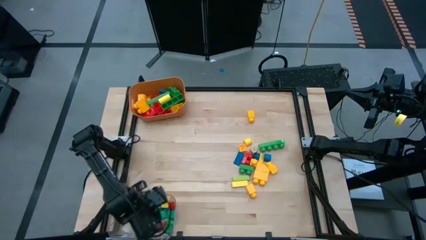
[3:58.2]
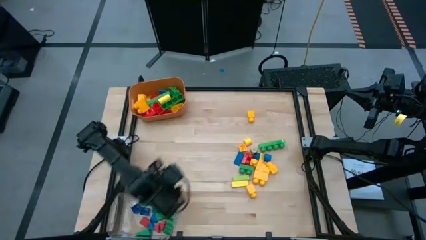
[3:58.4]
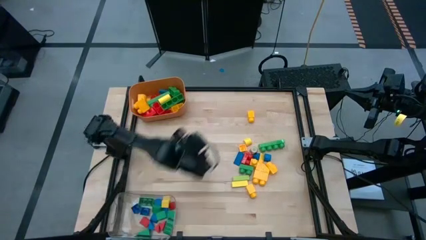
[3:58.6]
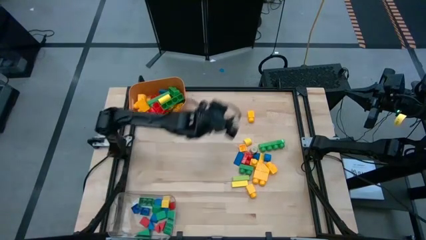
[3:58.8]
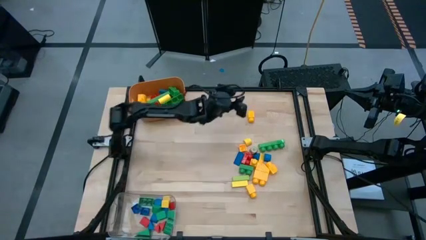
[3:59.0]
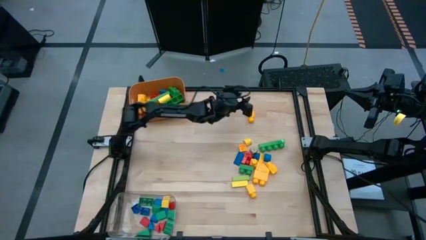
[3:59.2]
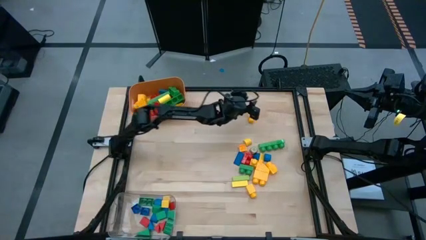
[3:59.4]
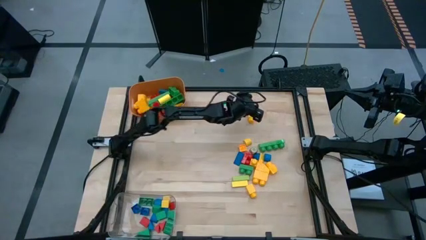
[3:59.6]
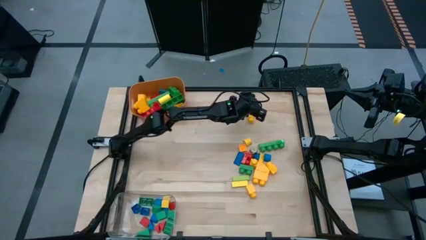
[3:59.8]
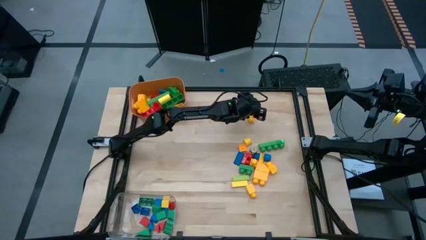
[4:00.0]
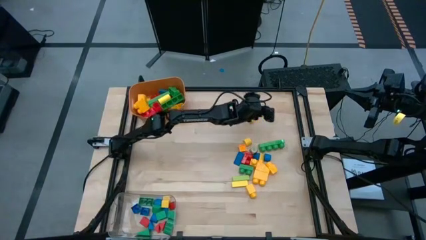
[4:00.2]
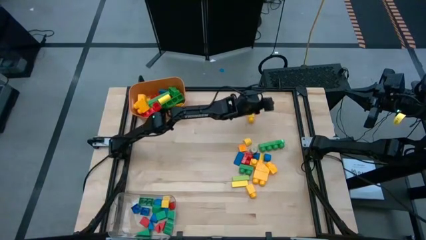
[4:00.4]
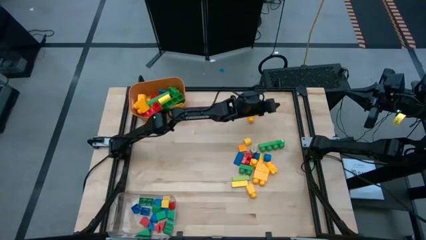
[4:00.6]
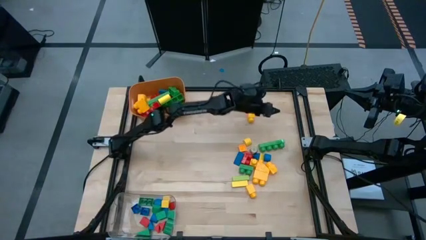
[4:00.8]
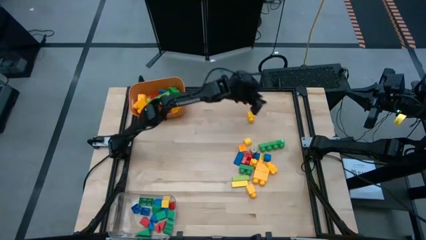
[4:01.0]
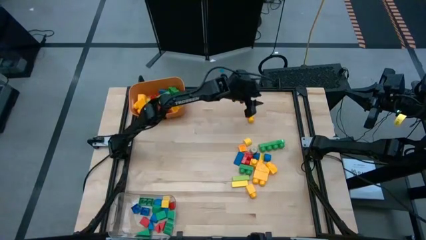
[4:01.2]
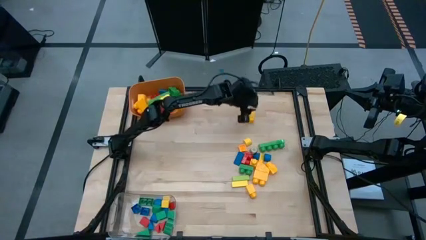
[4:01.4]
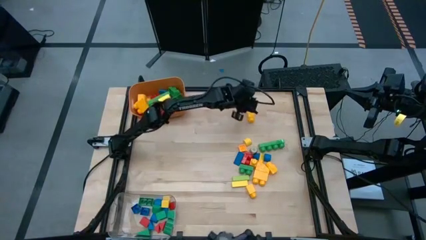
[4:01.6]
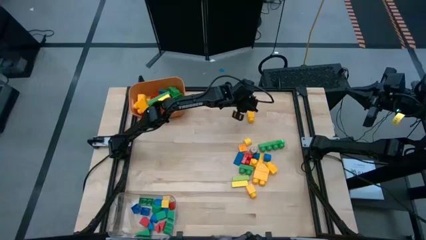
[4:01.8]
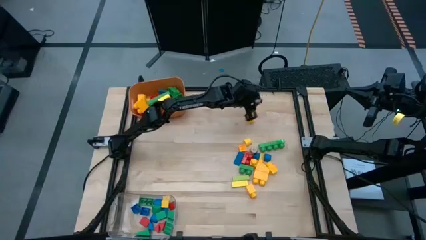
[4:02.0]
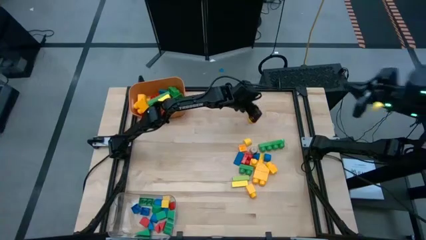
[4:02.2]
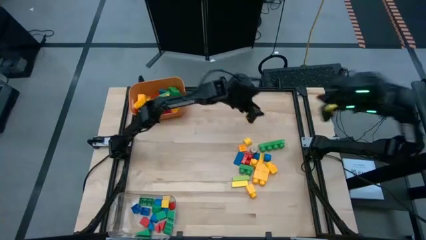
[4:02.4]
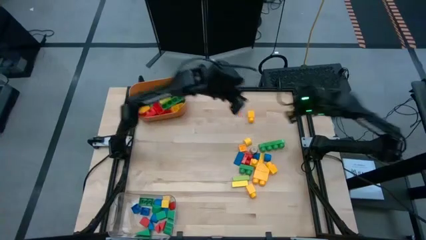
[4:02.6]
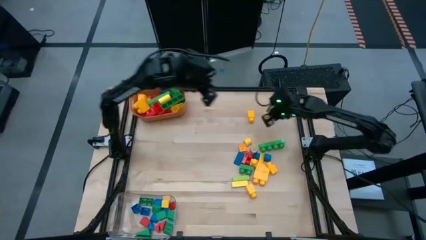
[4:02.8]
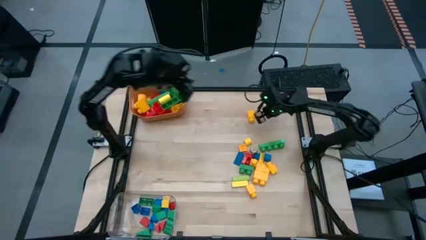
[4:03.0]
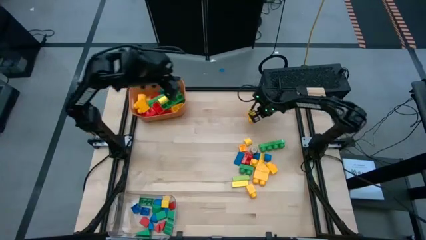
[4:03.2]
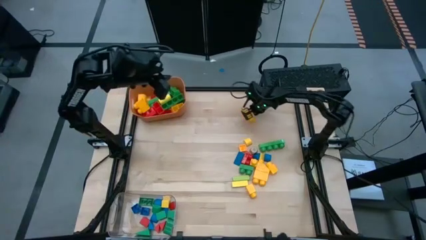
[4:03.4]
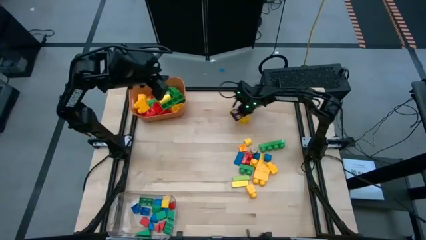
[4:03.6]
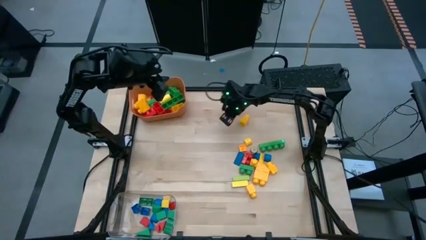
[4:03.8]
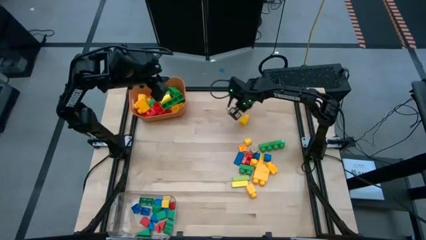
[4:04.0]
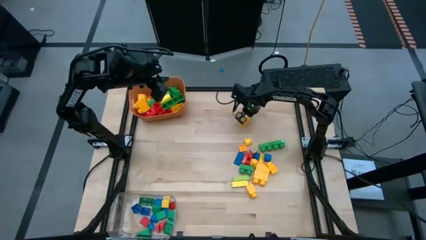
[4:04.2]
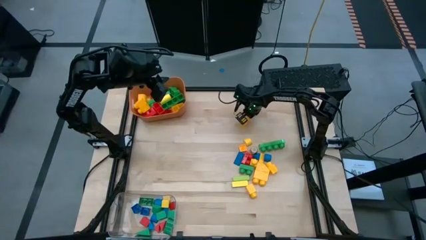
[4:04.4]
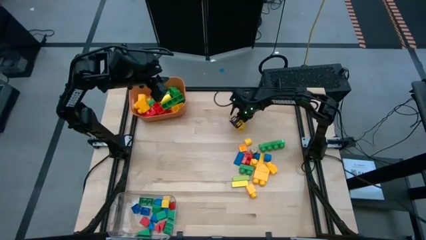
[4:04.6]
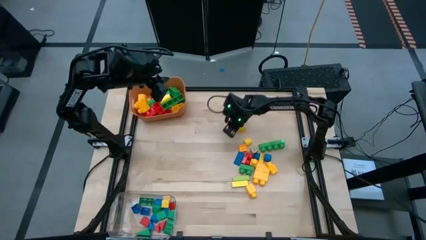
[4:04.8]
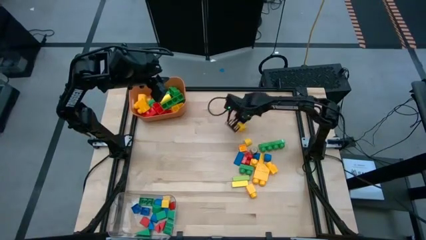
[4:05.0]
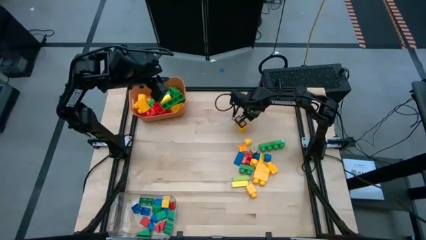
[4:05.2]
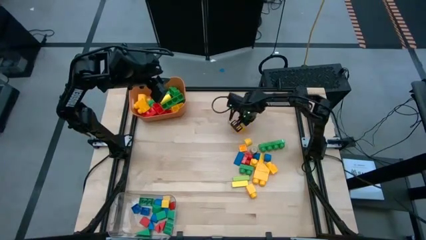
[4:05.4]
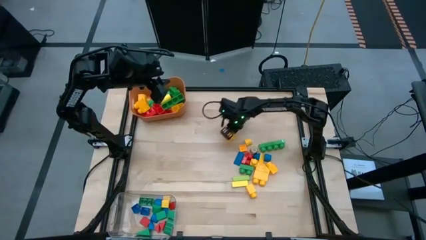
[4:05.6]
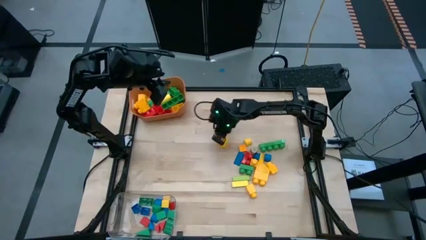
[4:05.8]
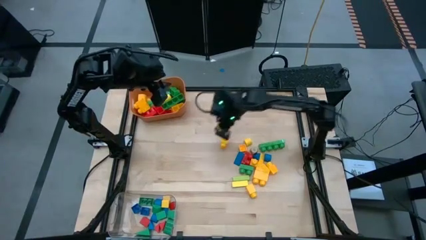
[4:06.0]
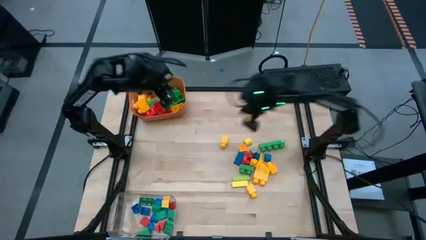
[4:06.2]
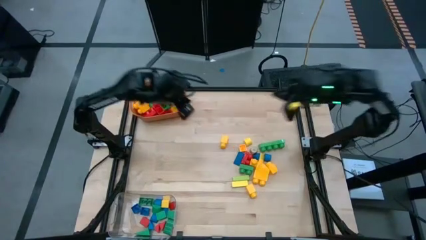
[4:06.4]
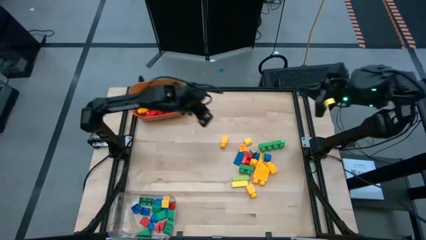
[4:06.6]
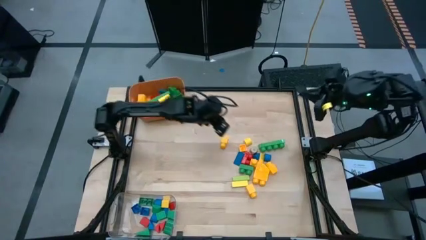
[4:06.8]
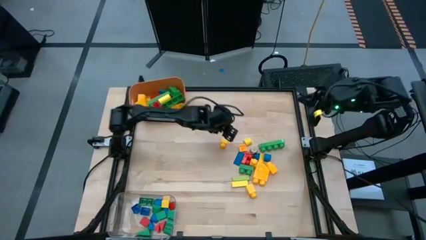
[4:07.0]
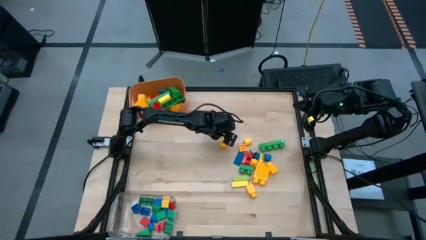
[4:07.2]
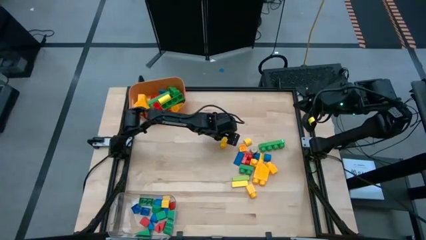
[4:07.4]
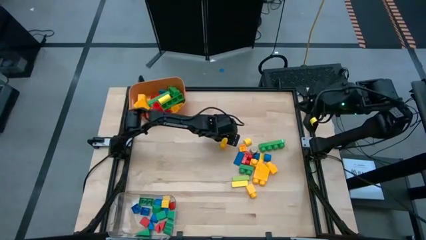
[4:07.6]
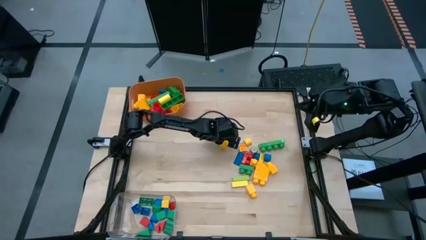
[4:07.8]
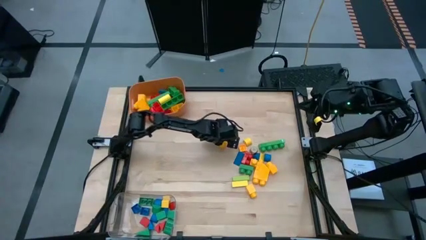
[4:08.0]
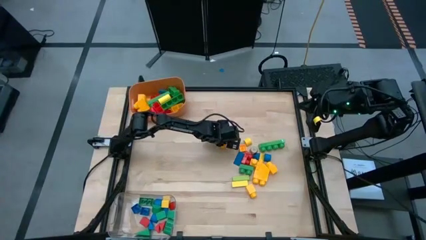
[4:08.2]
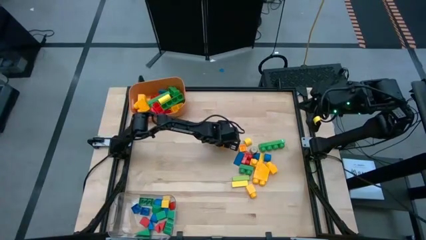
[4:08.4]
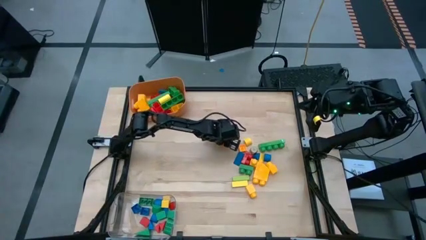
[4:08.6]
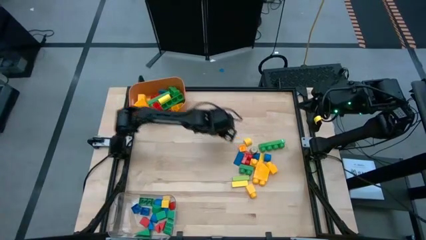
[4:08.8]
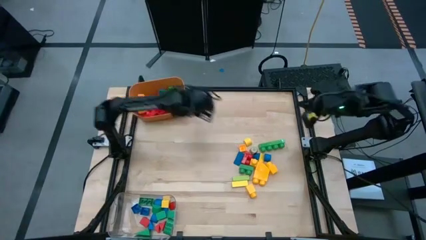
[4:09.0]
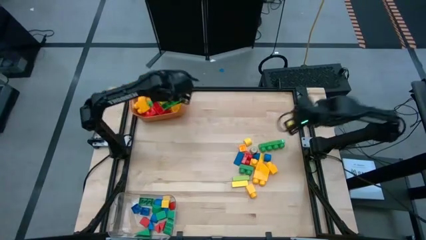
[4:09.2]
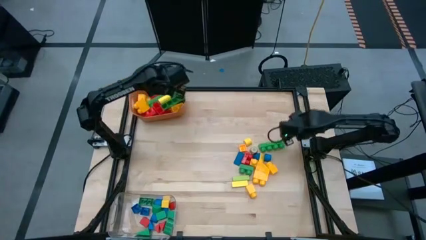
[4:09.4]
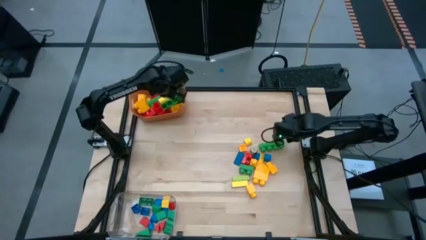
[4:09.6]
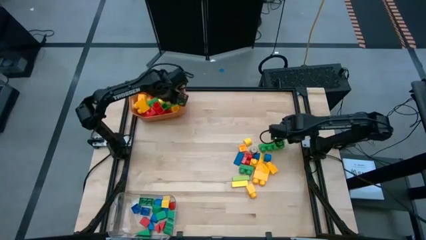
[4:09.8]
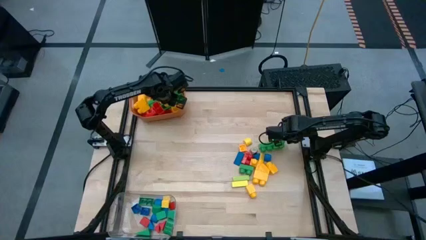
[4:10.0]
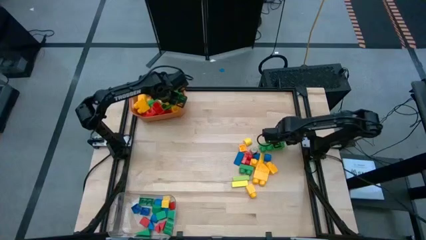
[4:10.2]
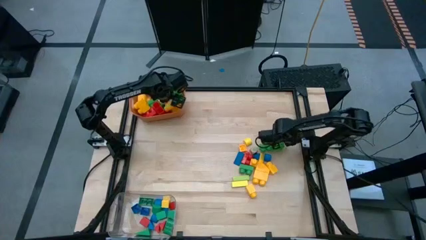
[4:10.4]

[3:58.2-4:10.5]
Task: Sort blocks by size
Put the small yellow game piece into the orange bin

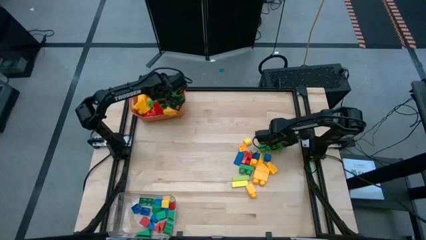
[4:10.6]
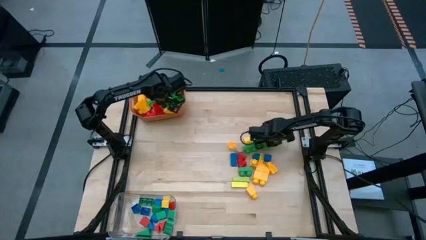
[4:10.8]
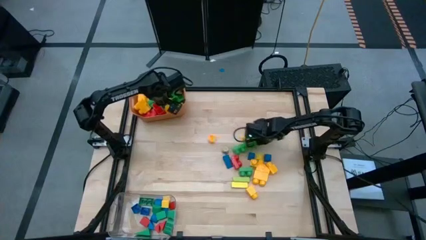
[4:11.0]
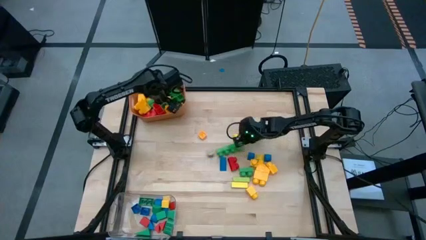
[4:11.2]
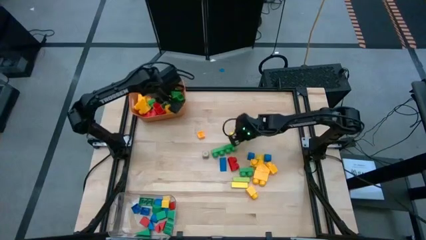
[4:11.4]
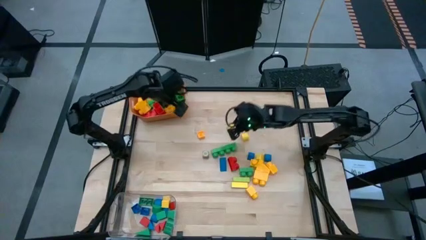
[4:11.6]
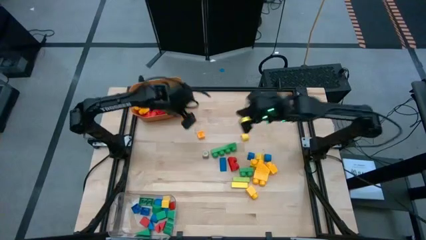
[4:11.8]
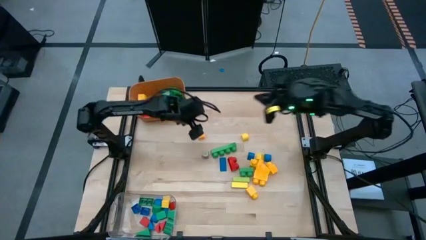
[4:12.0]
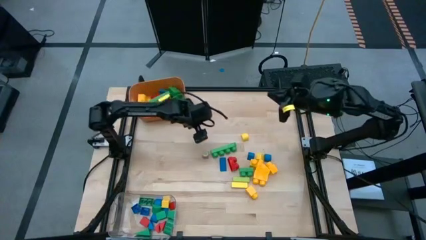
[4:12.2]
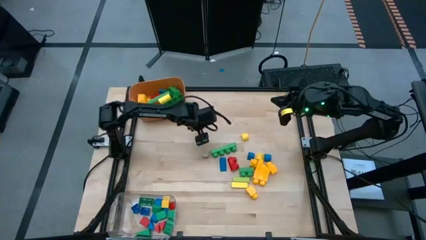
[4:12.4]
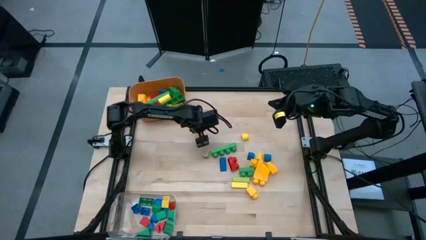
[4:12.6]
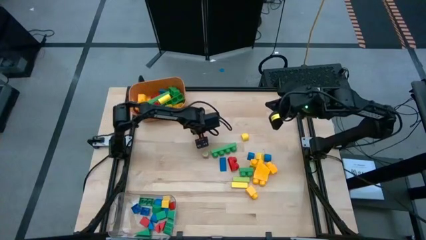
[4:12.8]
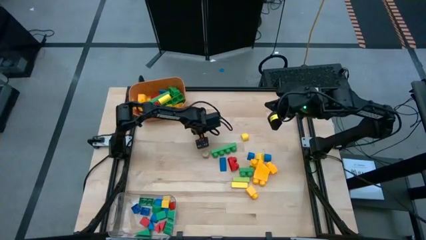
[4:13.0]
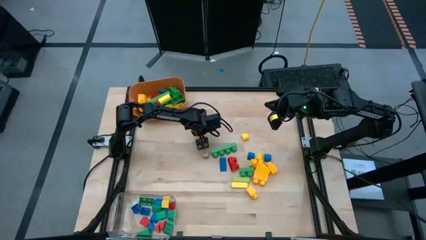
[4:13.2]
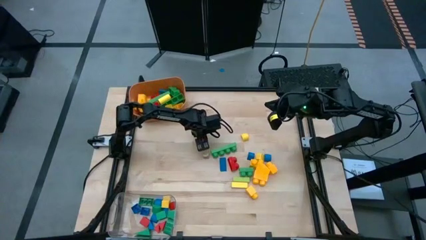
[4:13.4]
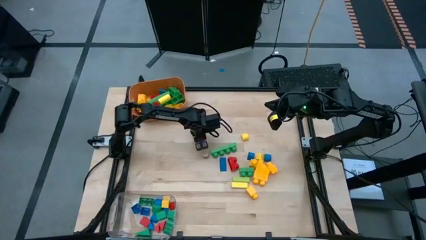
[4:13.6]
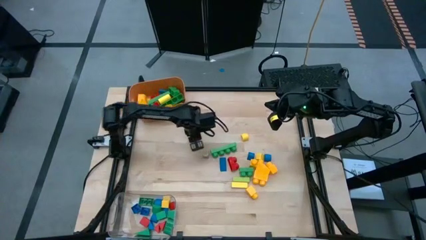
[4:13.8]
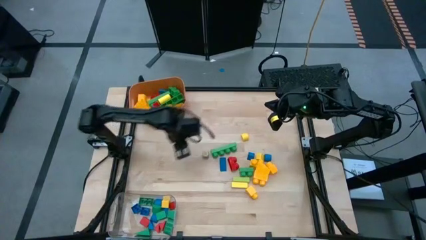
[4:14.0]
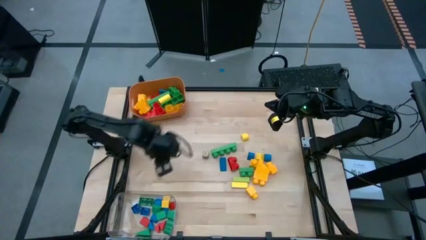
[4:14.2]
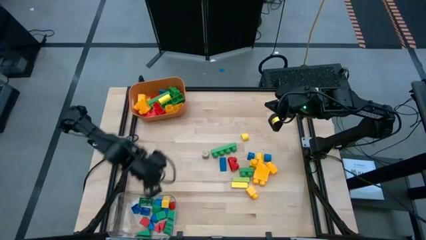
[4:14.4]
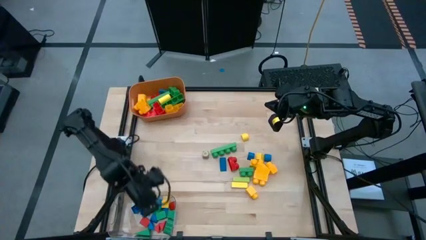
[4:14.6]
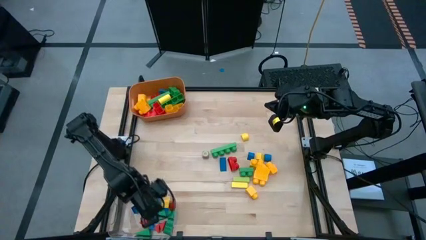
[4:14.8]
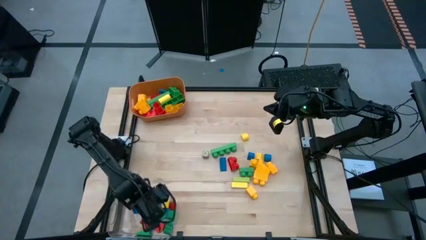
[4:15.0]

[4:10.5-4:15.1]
Put the small yellow game piece into the transparent bin
